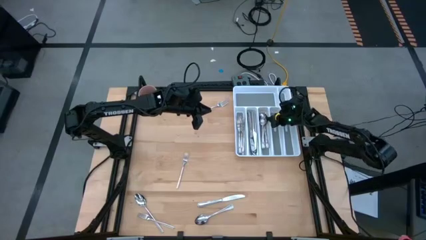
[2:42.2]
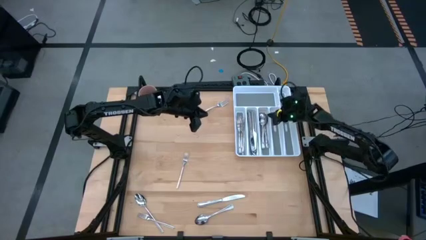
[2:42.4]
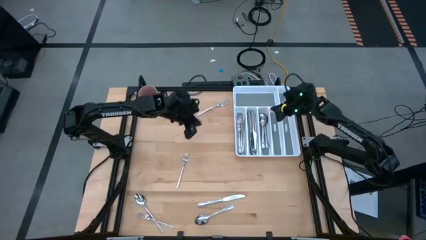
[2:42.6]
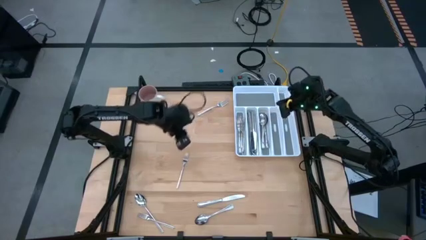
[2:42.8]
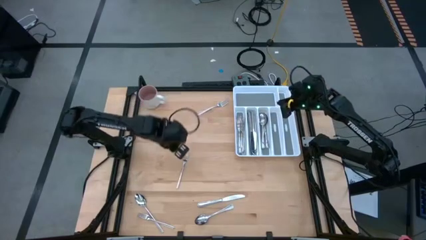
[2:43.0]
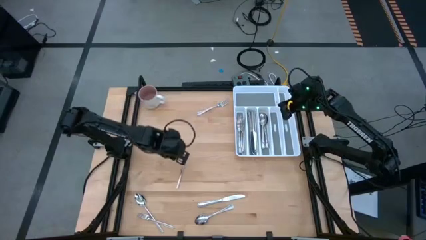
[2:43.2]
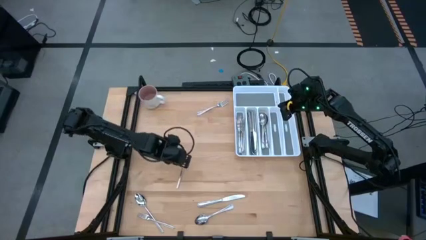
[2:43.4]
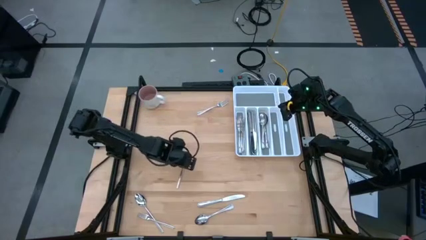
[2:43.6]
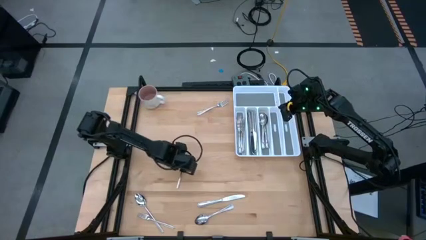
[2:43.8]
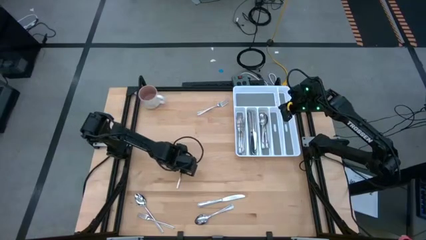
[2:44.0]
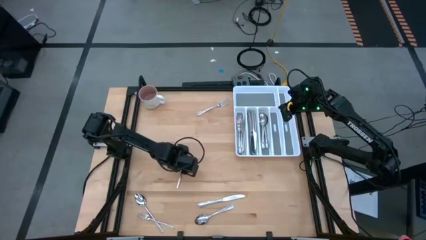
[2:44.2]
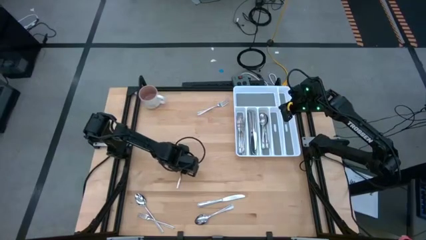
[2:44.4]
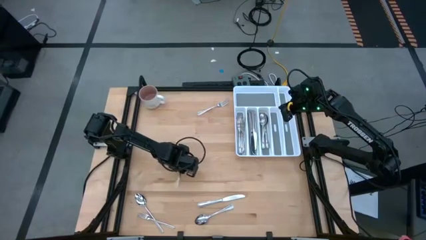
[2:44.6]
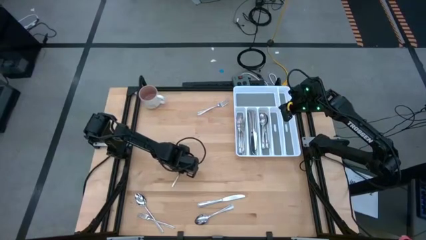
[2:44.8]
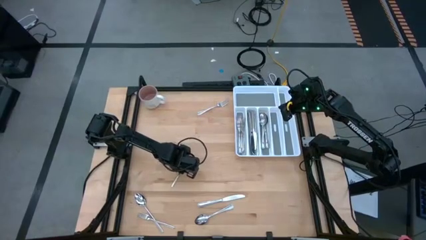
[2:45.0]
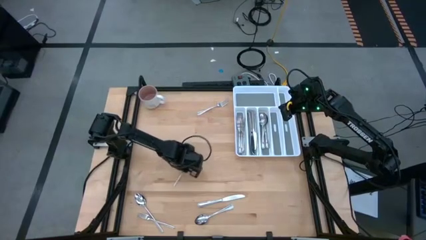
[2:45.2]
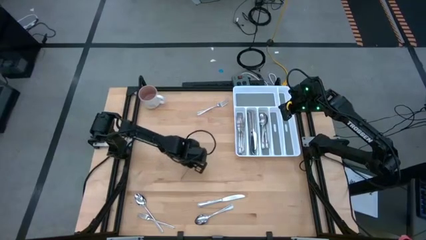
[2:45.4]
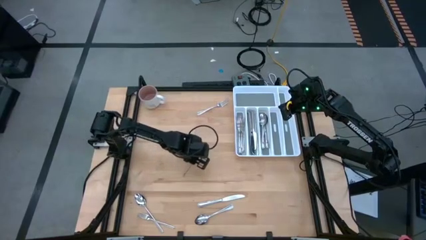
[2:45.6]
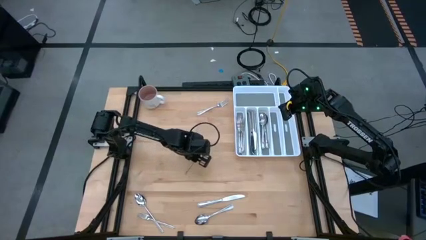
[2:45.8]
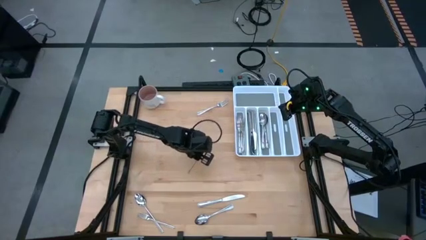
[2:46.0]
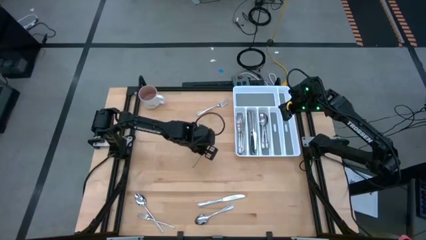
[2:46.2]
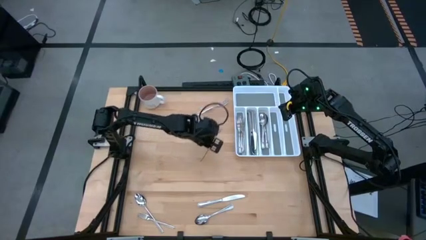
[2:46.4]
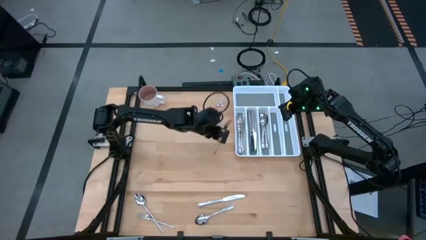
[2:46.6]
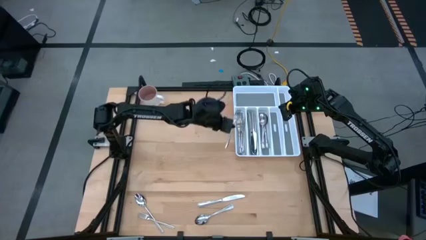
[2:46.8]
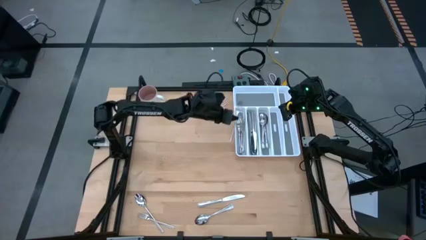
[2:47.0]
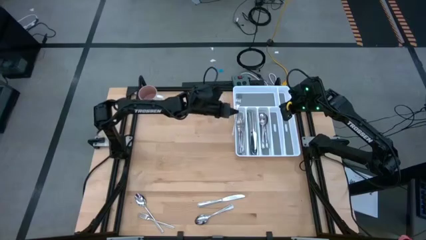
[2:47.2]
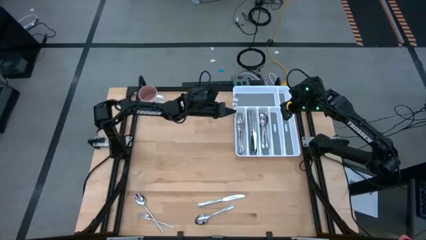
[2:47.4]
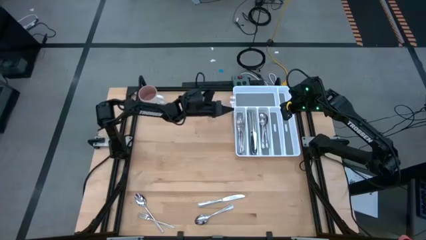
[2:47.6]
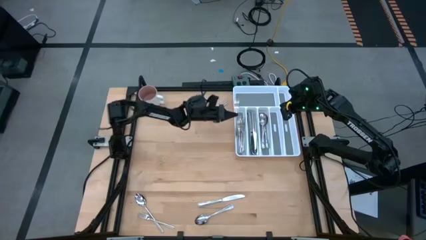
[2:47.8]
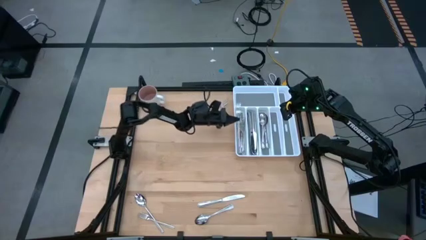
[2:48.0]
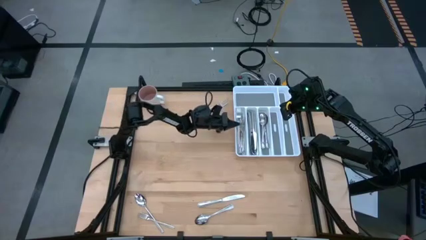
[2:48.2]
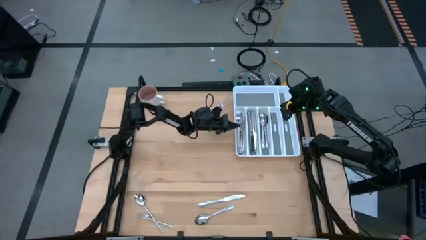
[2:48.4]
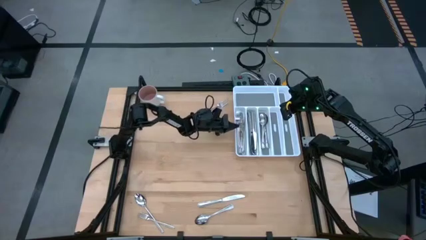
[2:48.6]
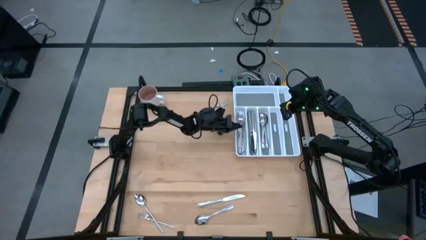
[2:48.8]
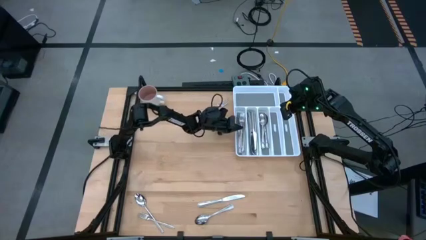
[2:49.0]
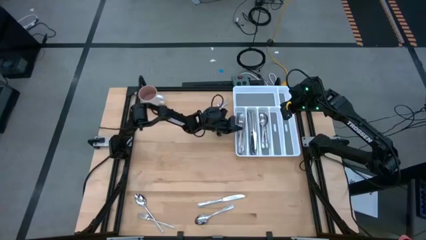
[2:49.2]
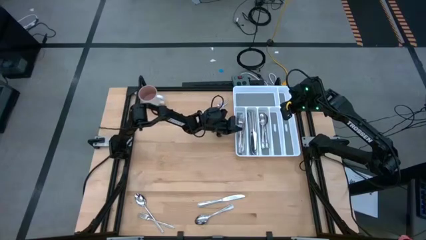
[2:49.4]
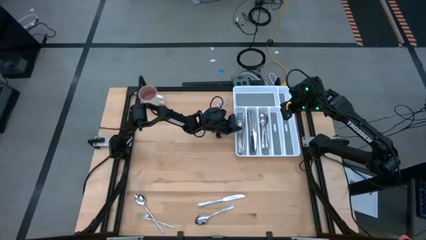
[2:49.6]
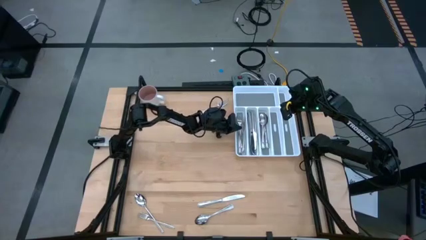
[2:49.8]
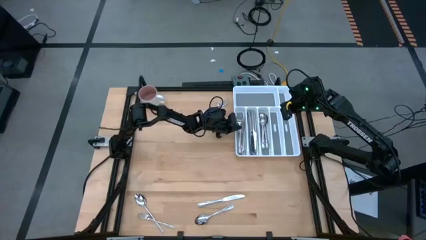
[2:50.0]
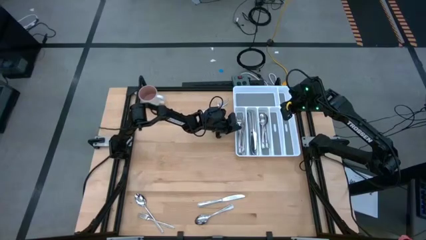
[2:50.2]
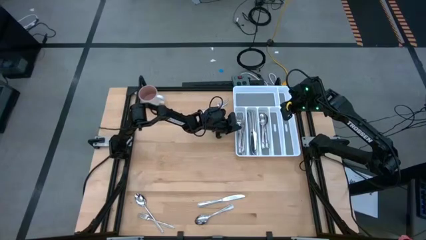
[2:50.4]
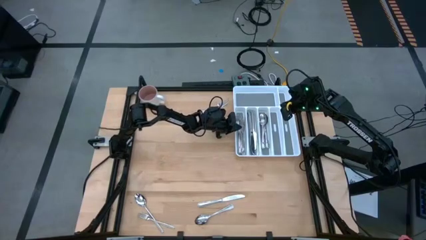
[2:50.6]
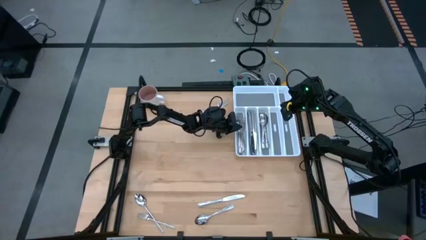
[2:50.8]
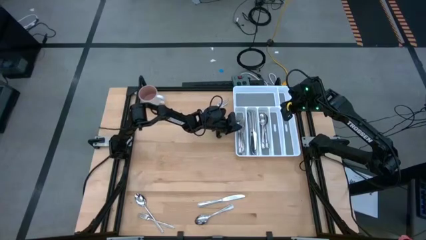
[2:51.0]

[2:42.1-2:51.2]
Task: Sort silverware
Put the silver fork into the left slot of the white silverware tray

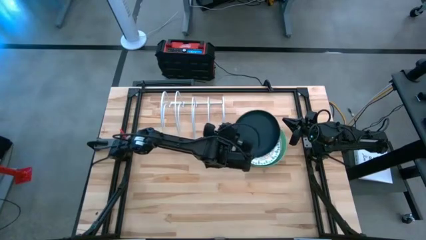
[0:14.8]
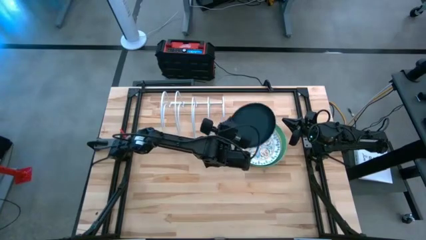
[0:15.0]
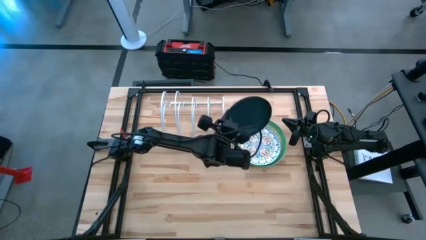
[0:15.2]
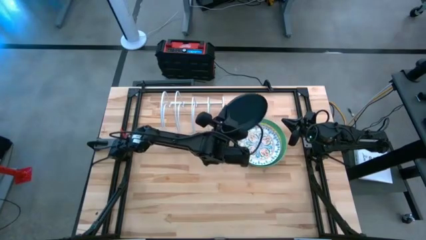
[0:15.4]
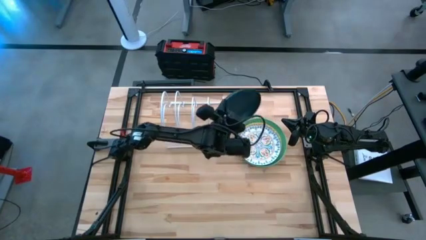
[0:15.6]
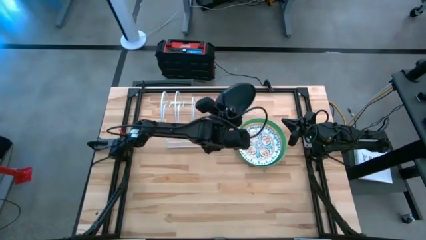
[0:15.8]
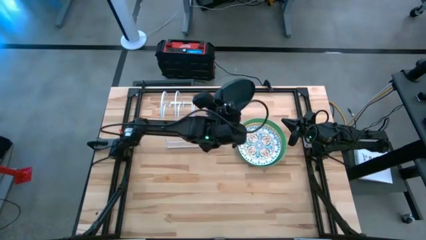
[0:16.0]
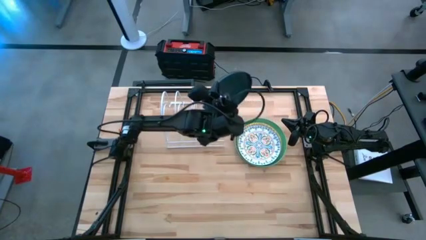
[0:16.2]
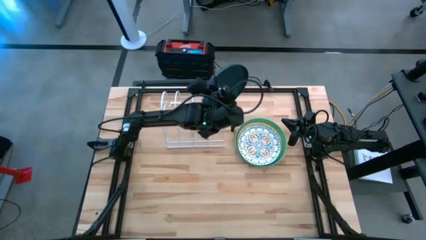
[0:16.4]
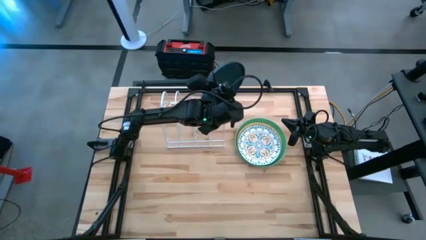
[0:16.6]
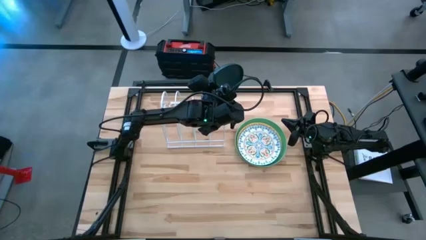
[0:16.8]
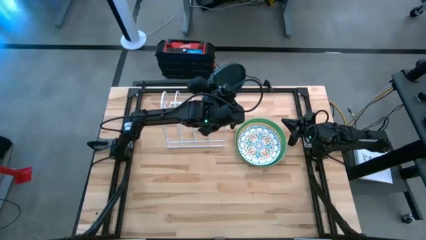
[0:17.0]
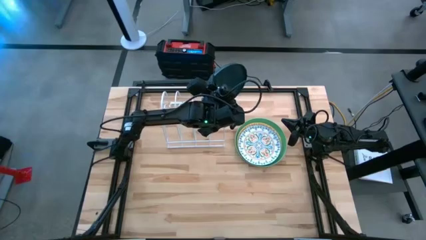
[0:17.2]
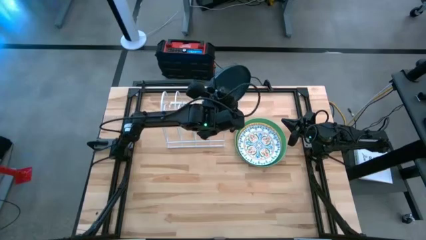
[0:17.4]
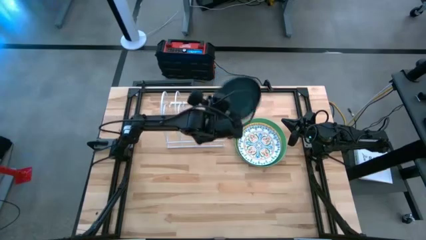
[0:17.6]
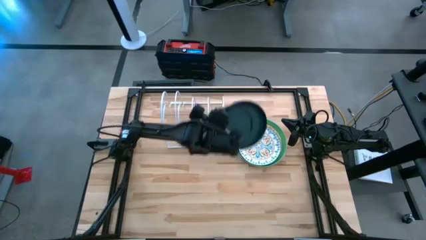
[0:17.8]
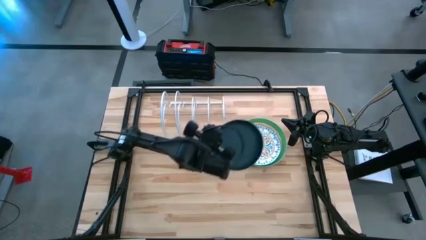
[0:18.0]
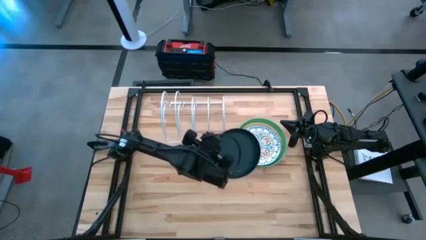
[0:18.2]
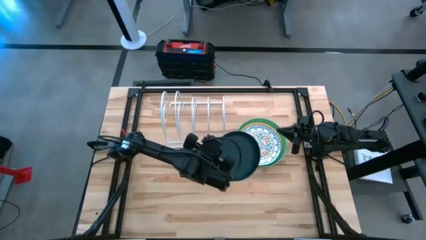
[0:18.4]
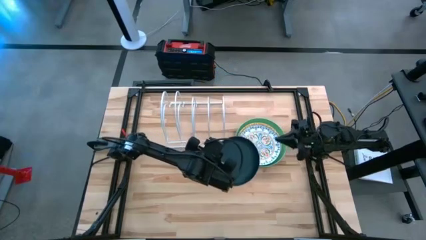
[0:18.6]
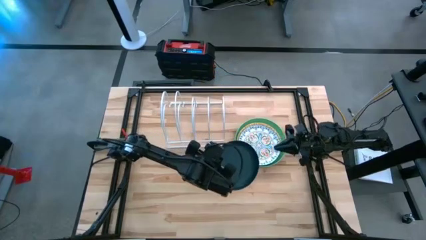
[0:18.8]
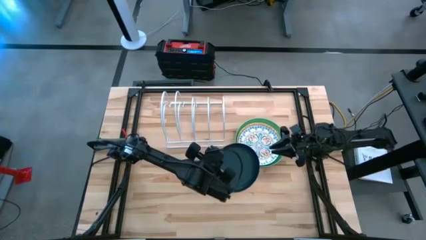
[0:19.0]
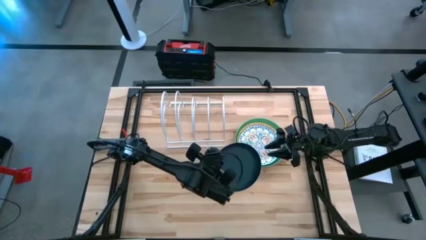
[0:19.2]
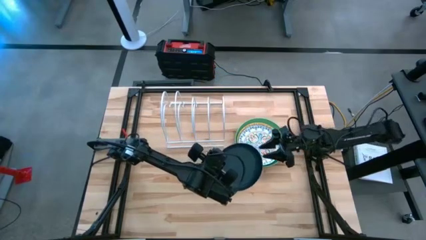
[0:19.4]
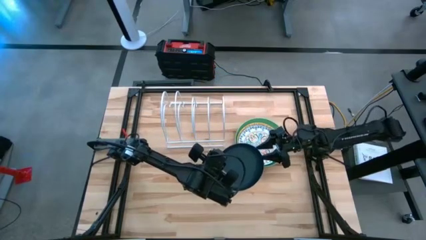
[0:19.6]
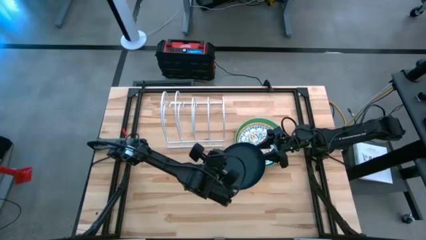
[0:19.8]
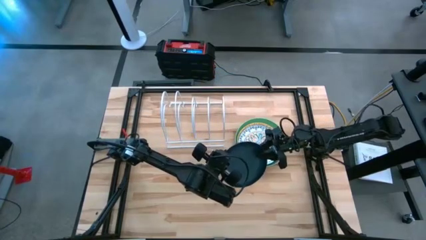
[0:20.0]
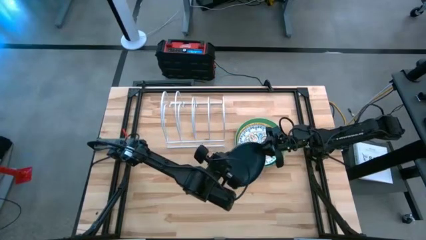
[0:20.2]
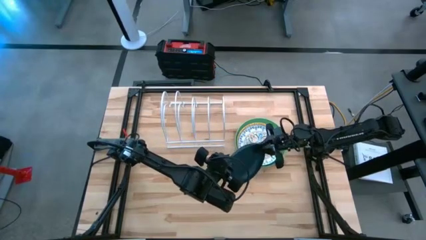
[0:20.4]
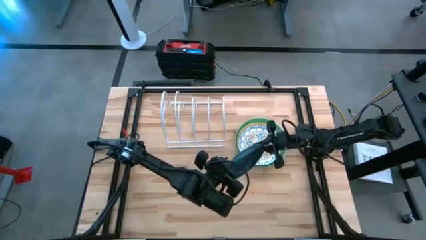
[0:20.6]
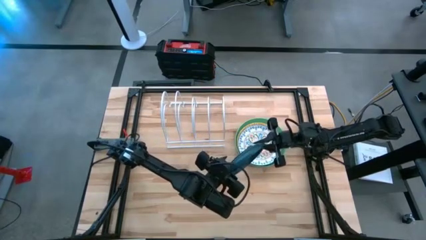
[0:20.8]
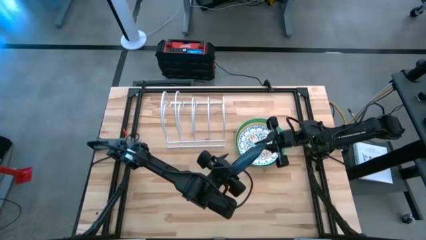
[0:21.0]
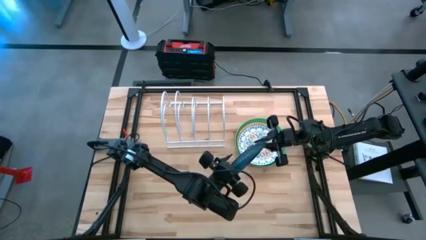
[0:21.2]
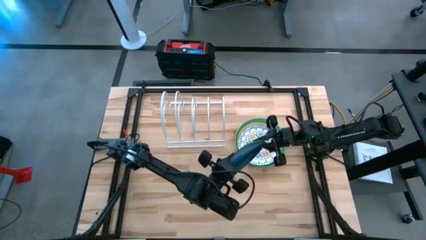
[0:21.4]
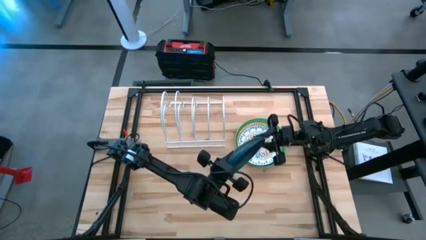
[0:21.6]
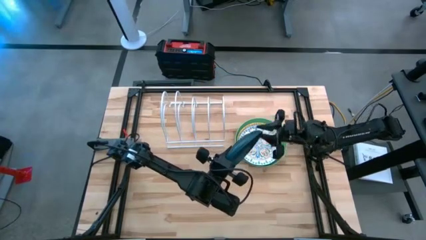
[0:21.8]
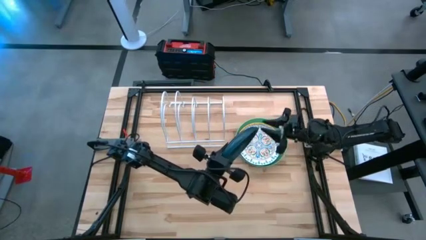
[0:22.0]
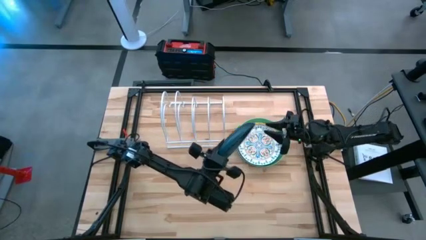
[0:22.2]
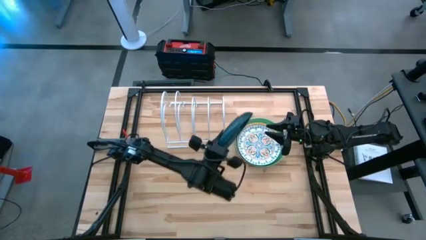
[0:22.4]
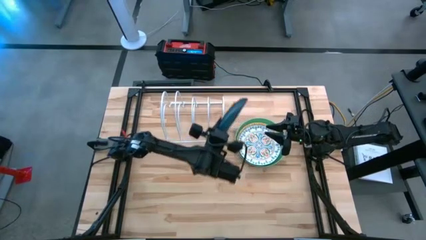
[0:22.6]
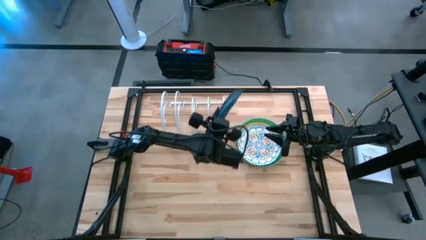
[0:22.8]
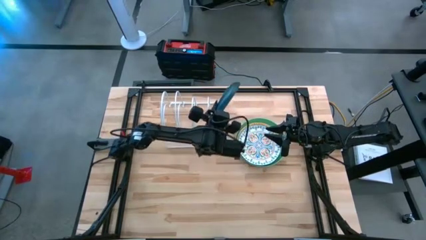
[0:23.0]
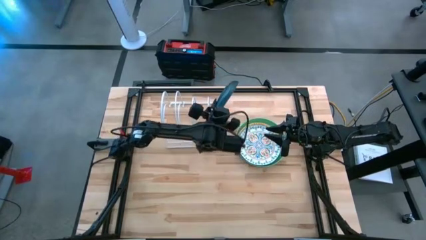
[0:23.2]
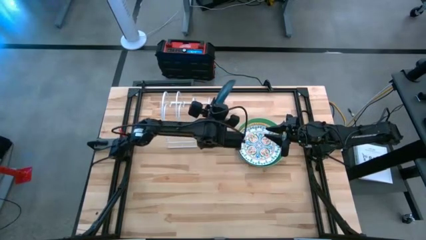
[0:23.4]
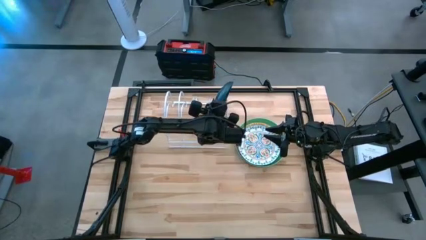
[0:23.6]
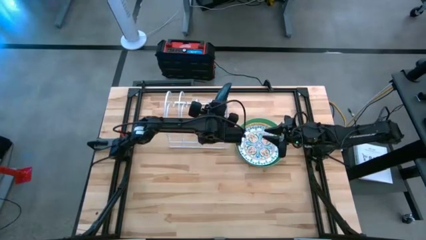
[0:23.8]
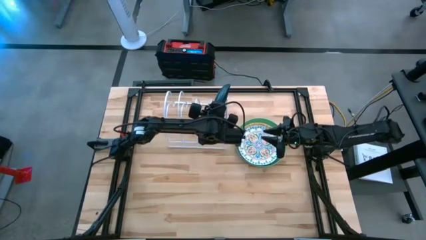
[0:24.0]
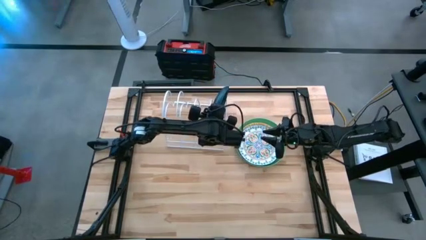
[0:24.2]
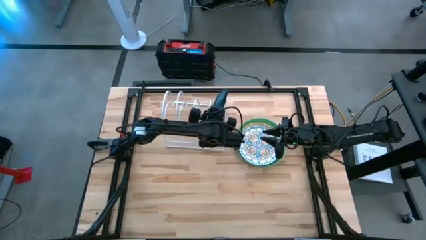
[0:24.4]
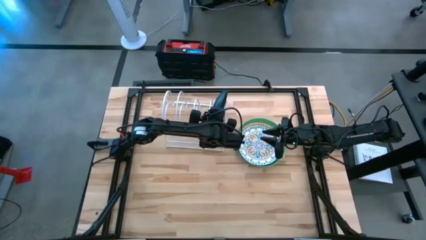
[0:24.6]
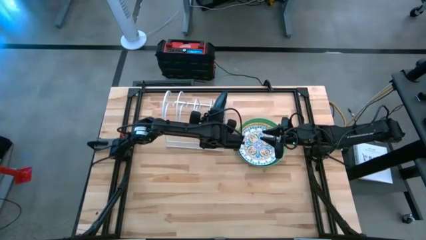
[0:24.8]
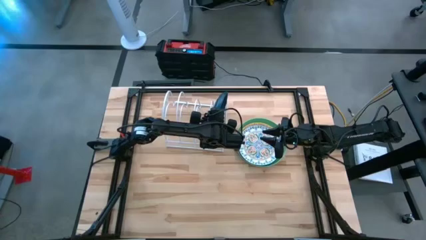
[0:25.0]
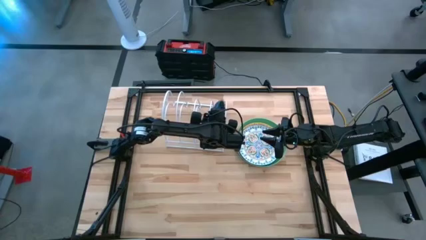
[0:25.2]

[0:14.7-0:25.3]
Task: Sort dishes
Put the dark blue plate in the dish rack
